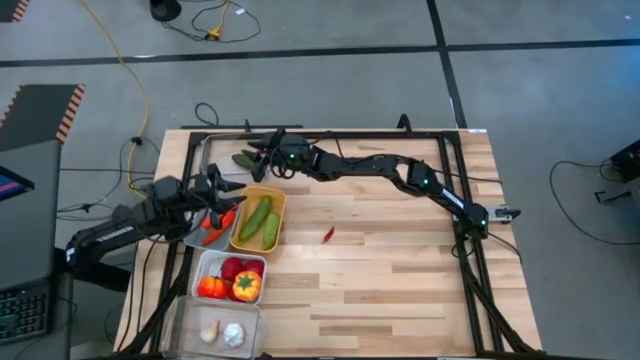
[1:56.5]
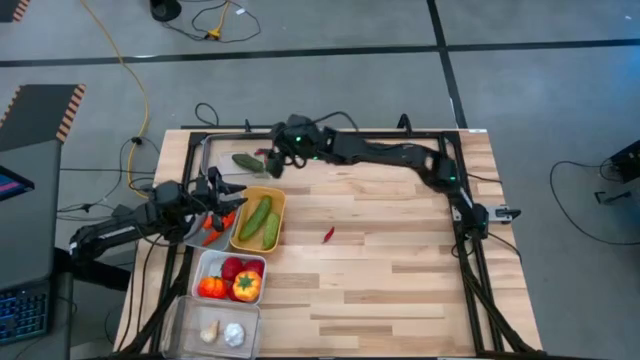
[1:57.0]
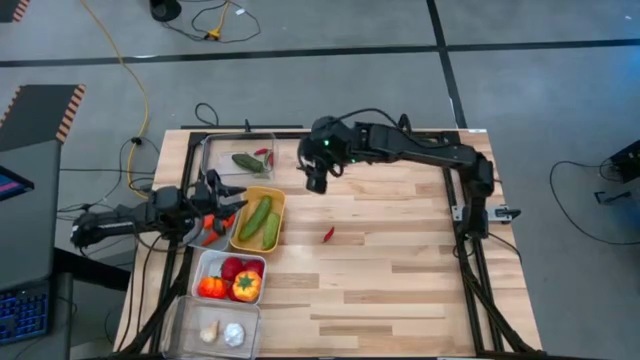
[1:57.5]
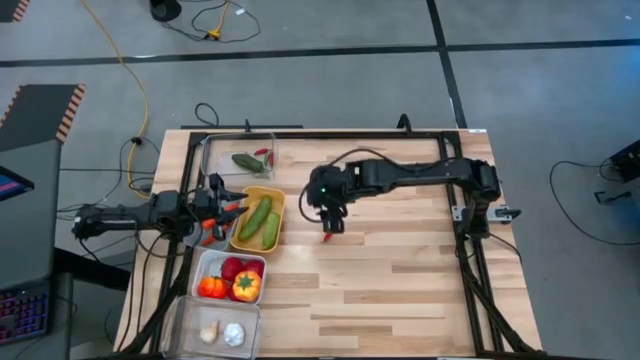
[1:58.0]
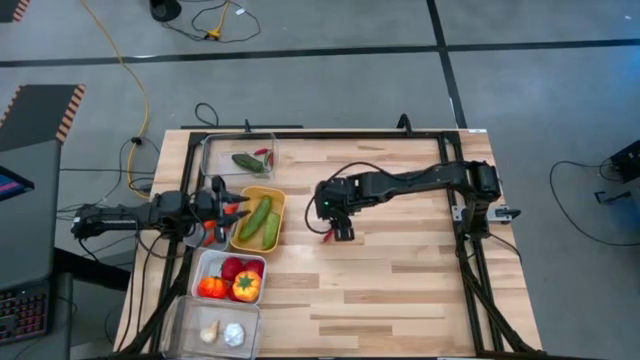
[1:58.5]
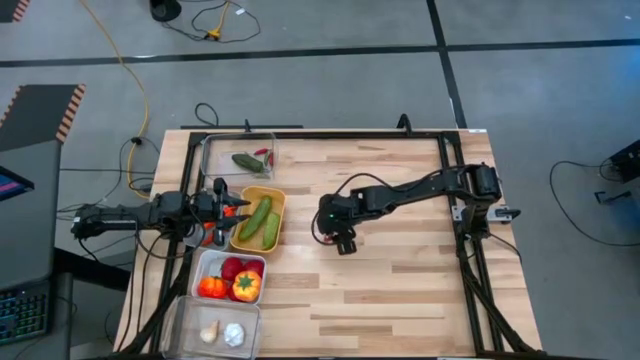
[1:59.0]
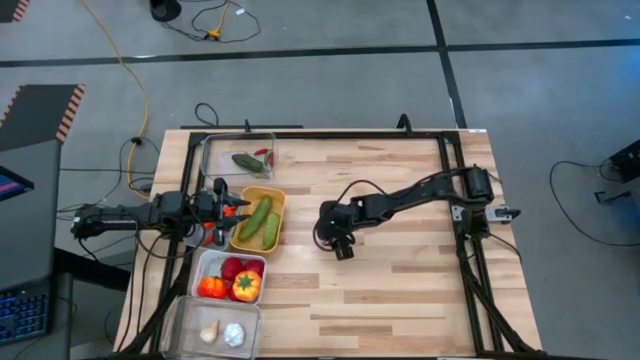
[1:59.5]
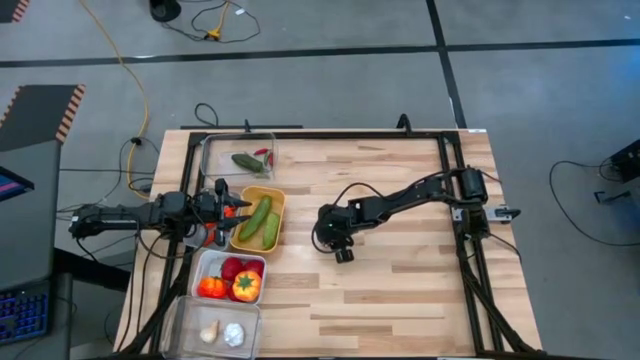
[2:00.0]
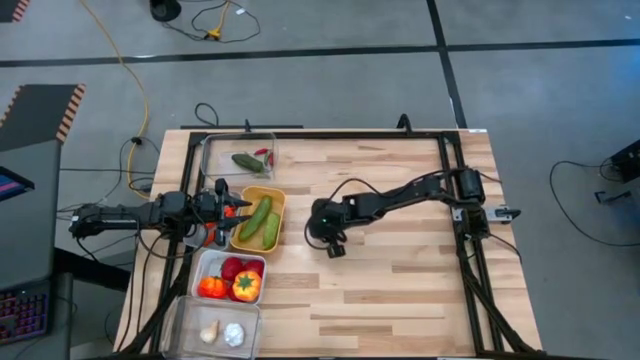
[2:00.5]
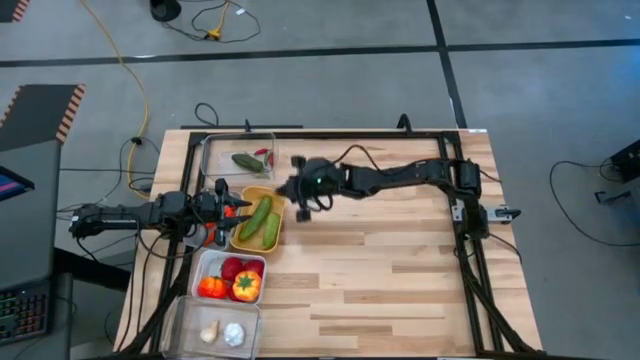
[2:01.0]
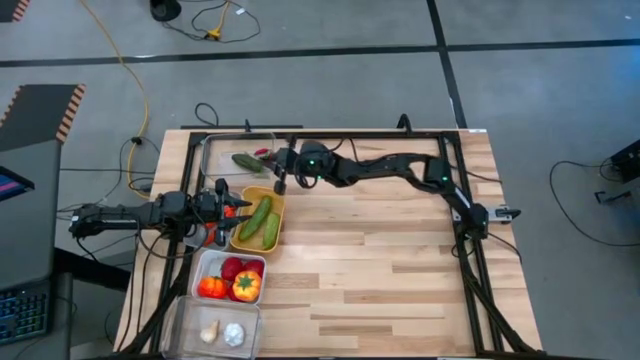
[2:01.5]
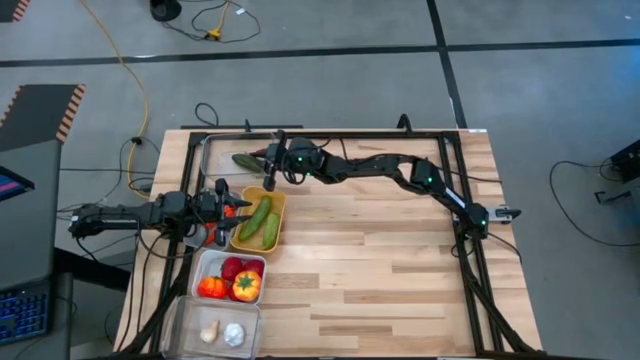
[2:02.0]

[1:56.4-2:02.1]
Task: Sort produce into baskets
Put the pepper into the top transparent bin

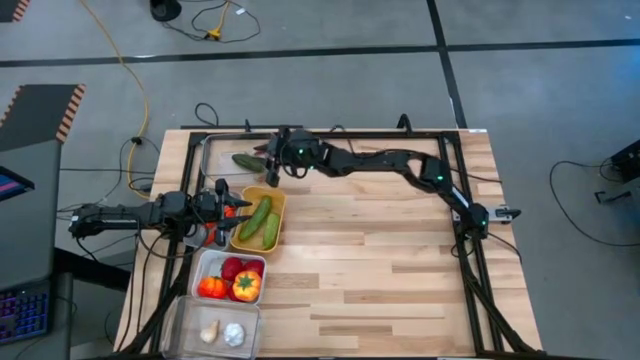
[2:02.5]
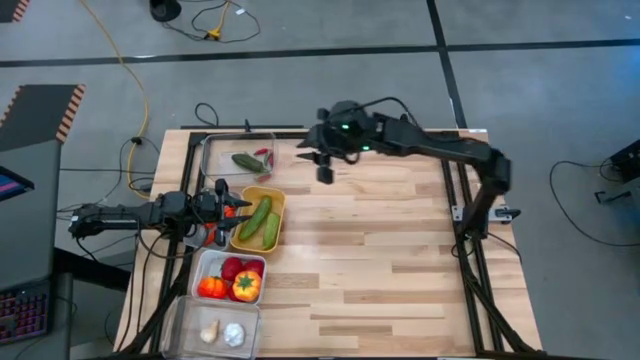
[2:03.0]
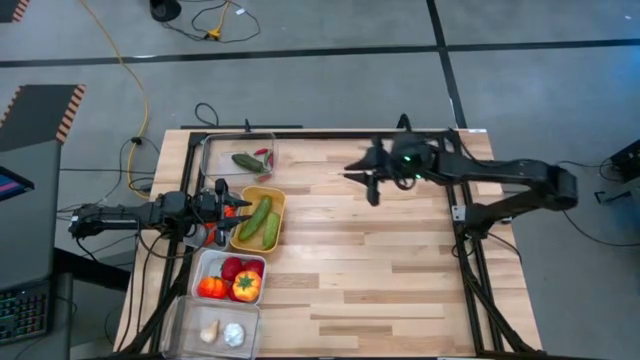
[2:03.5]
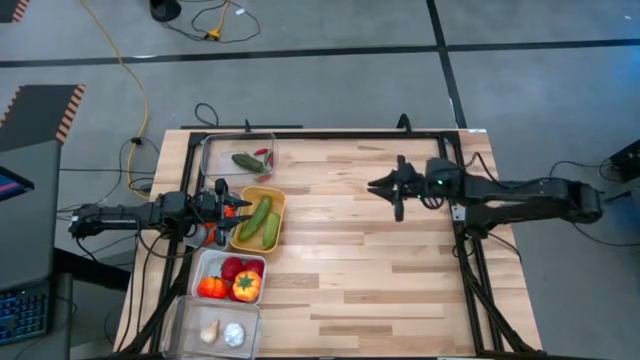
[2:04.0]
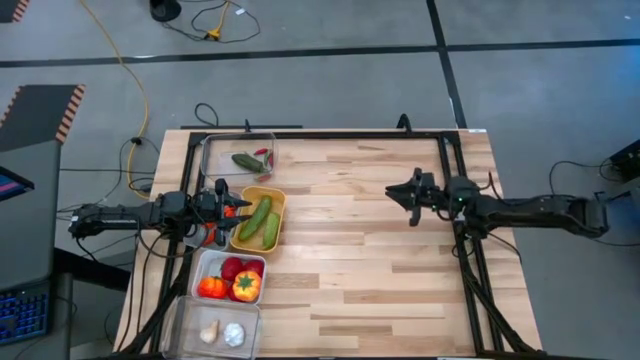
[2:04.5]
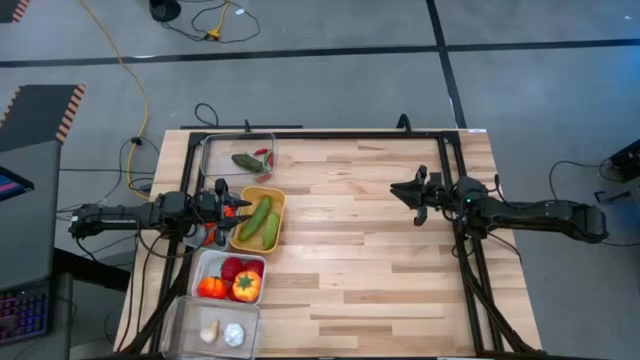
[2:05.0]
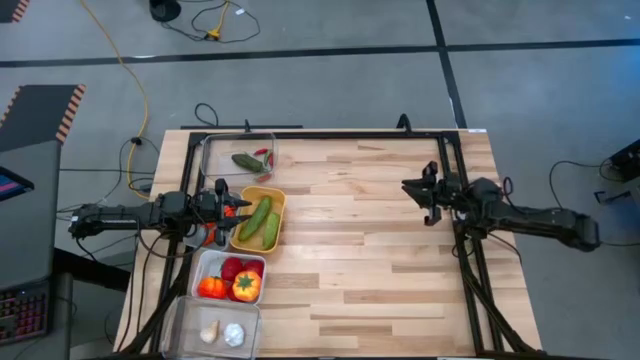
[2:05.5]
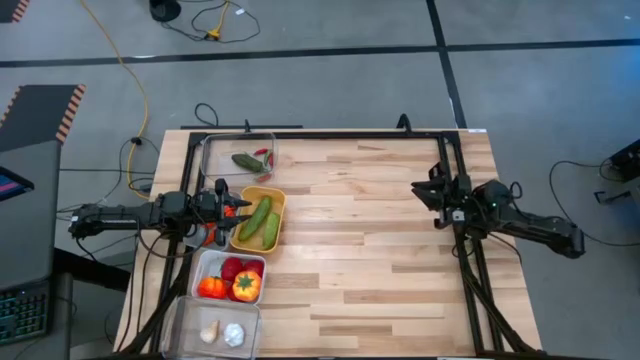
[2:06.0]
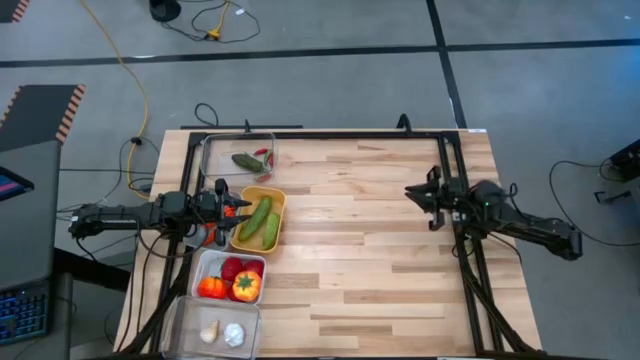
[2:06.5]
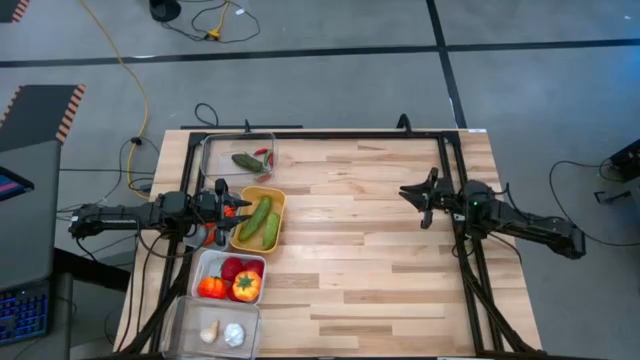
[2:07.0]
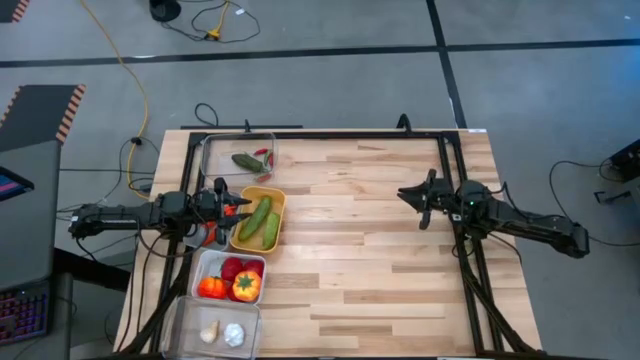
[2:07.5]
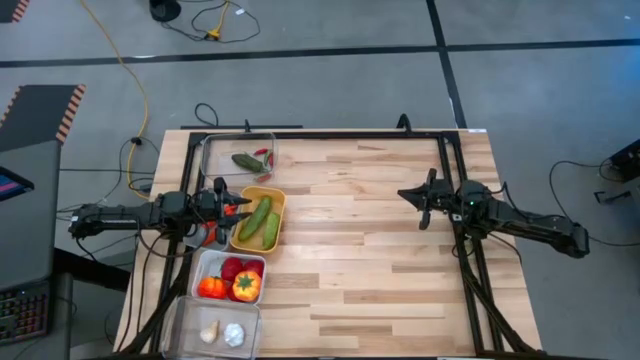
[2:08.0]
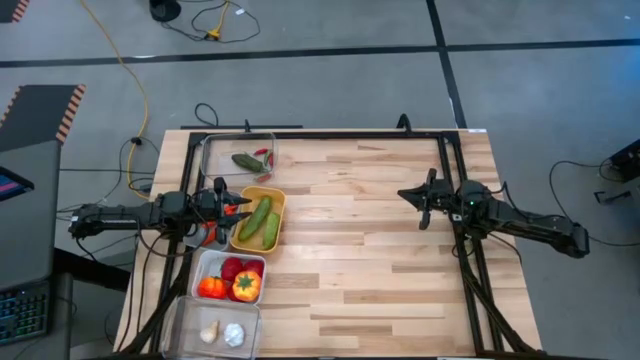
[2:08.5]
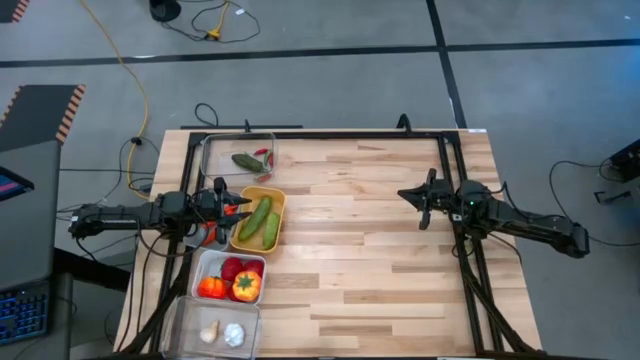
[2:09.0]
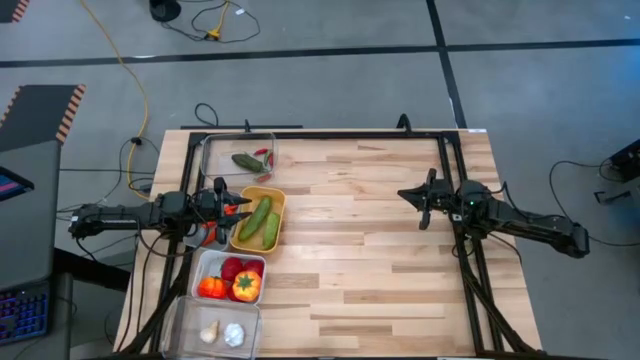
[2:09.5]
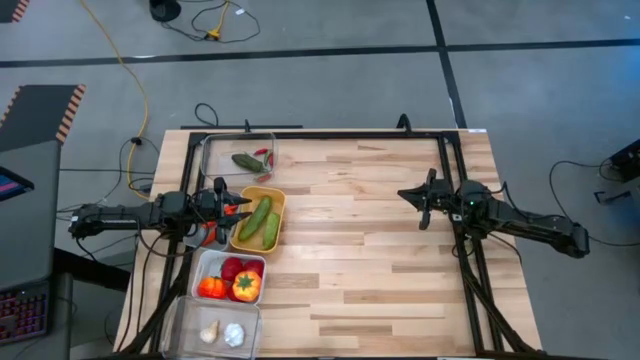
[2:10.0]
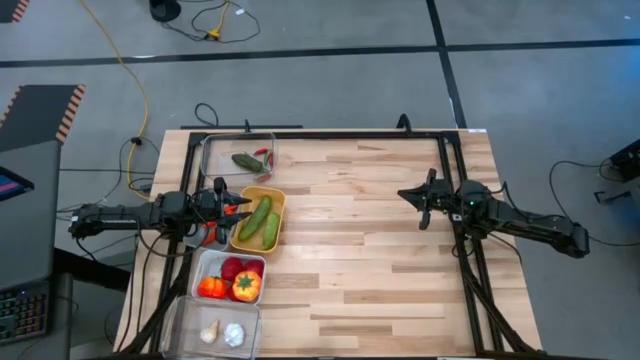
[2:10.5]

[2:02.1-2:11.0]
Return to Home Position

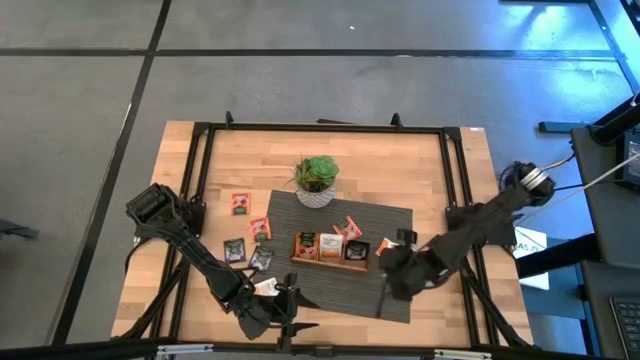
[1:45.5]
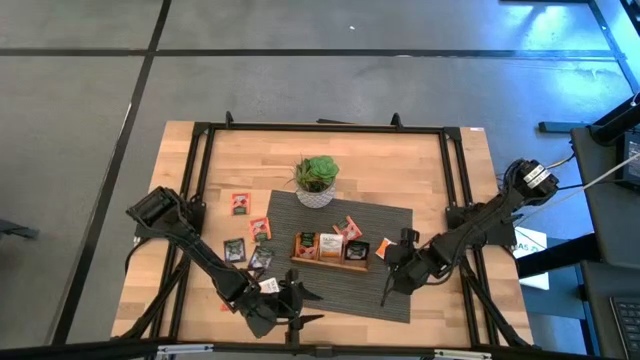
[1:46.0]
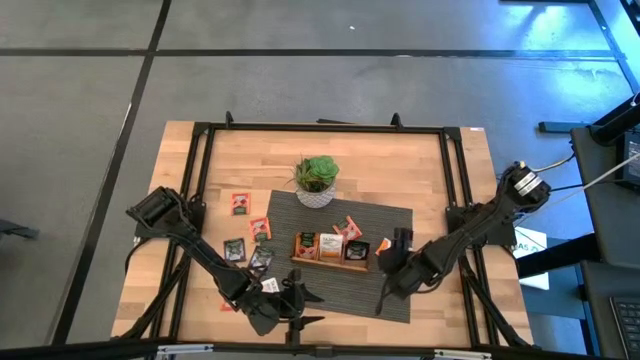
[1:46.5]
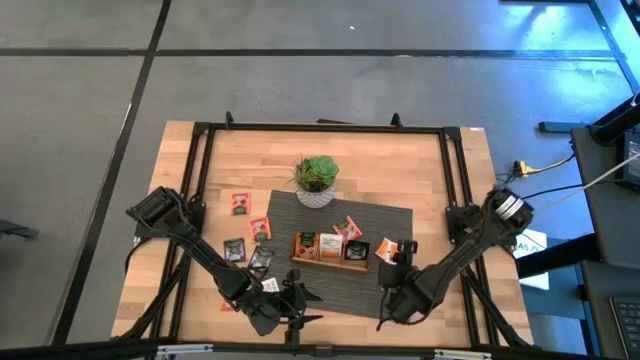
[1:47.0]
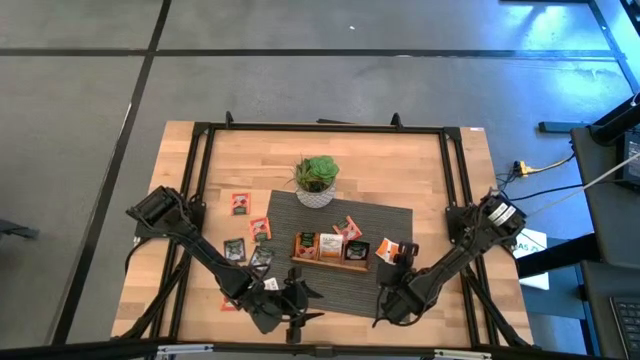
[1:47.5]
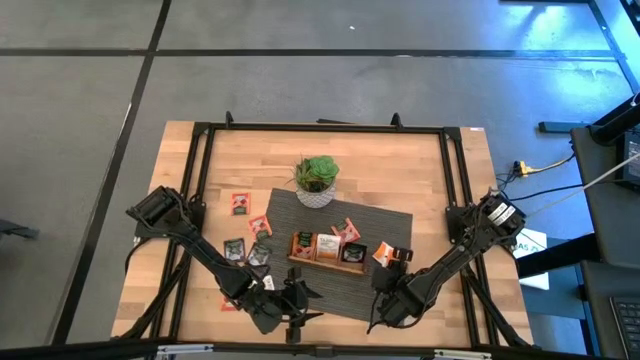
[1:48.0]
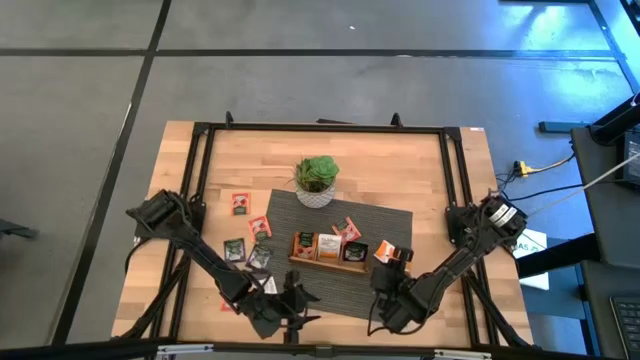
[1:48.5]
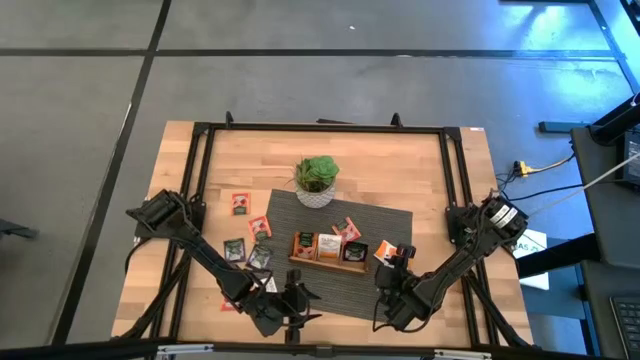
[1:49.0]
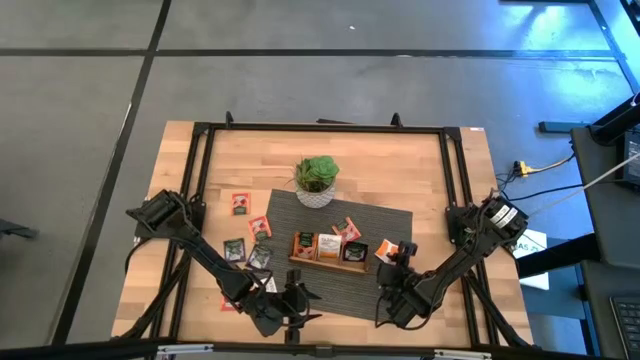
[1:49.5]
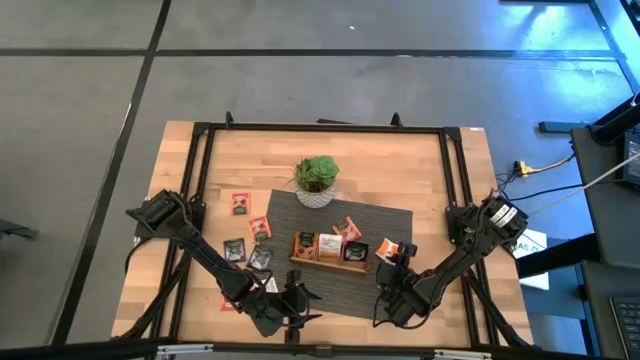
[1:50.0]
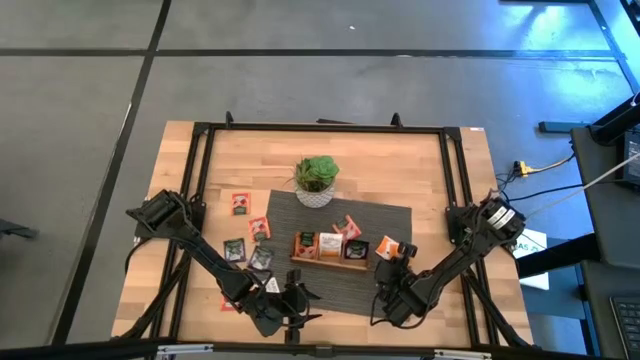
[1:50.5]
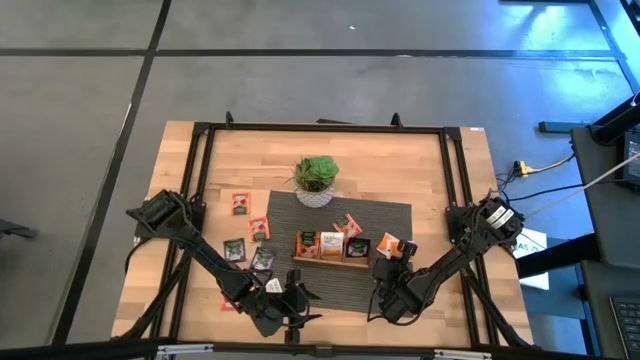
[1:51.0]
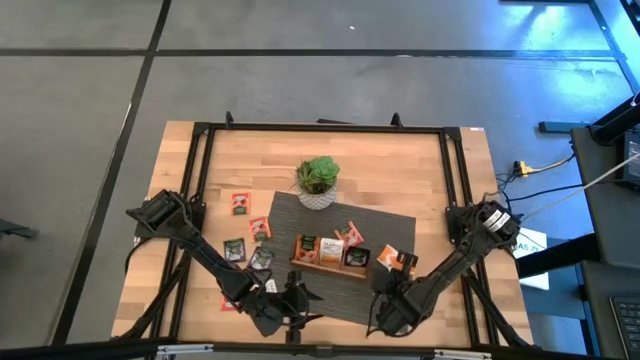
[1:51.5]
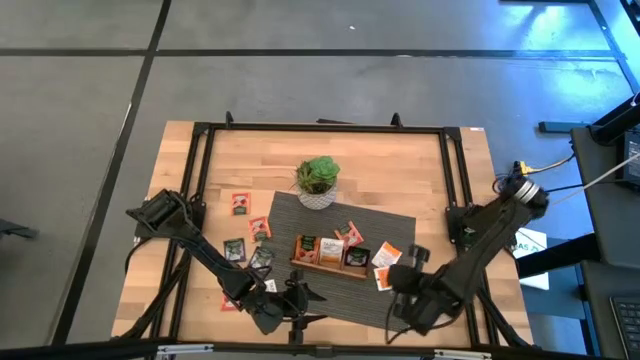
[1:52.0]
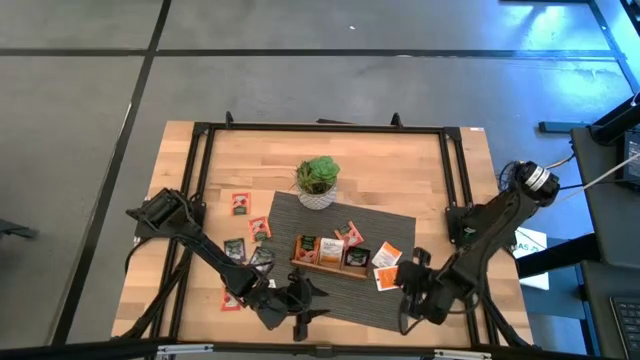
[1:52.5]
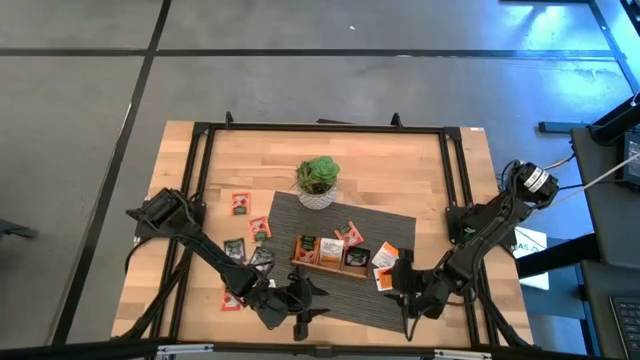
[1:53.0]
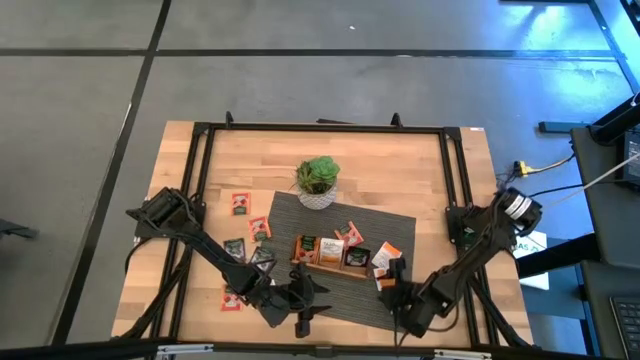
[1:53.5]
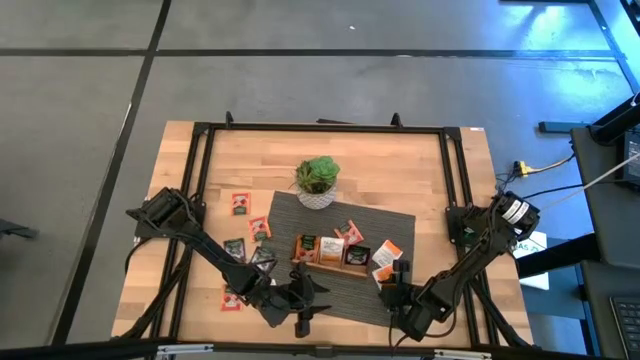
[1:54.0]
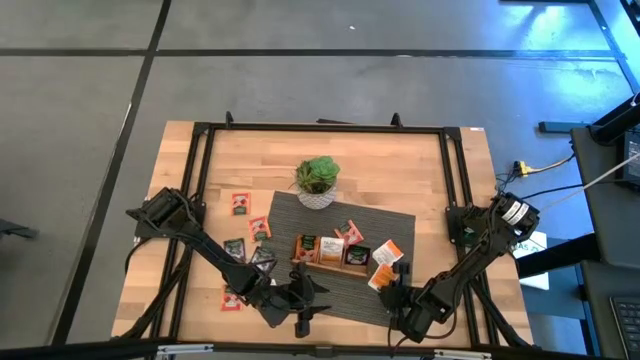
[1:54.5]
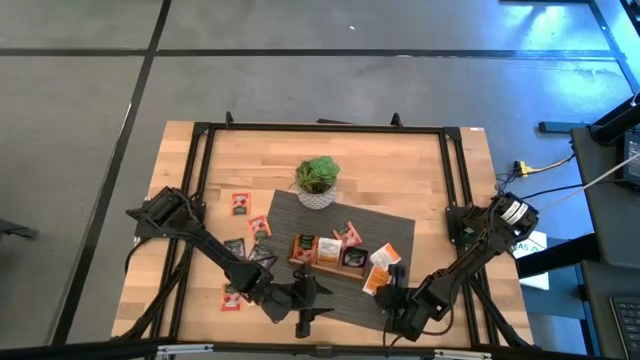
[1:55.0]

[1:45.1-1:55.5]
Task: Pick & Place Tea
Put the white tea bag into the middle of the wooden organizer
